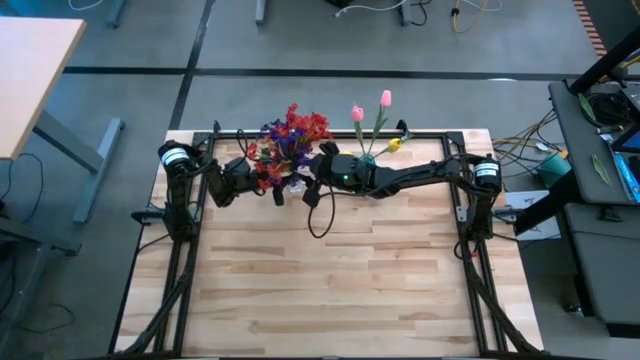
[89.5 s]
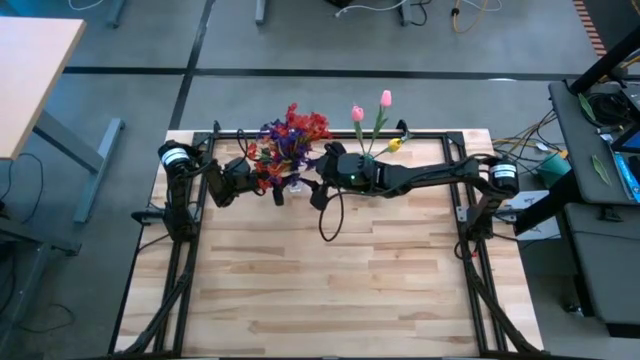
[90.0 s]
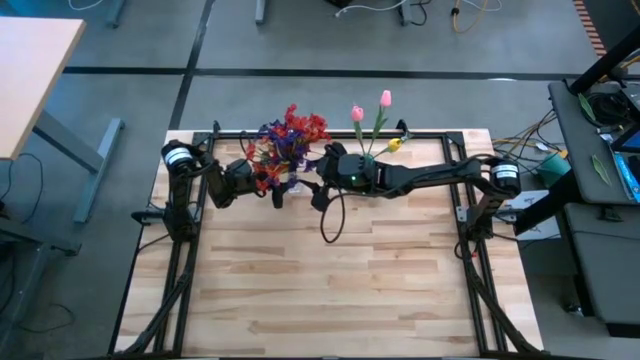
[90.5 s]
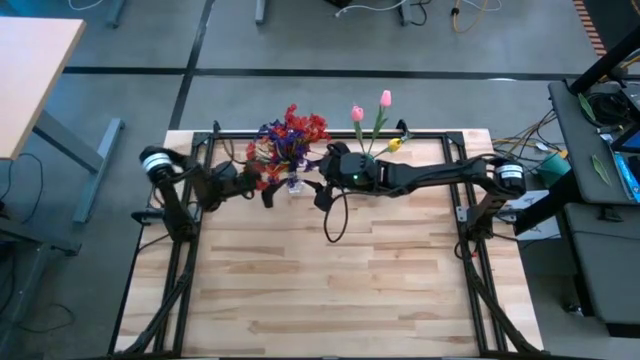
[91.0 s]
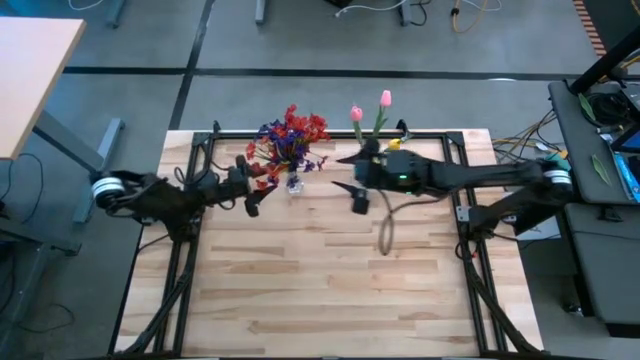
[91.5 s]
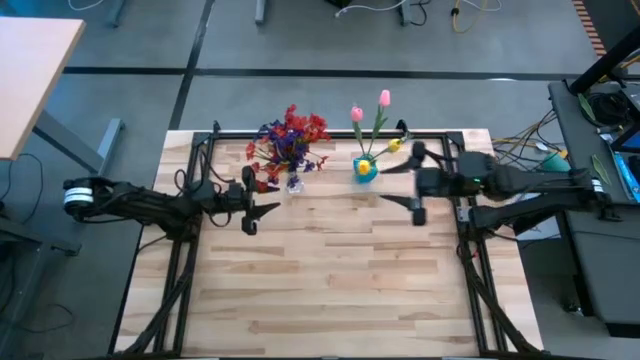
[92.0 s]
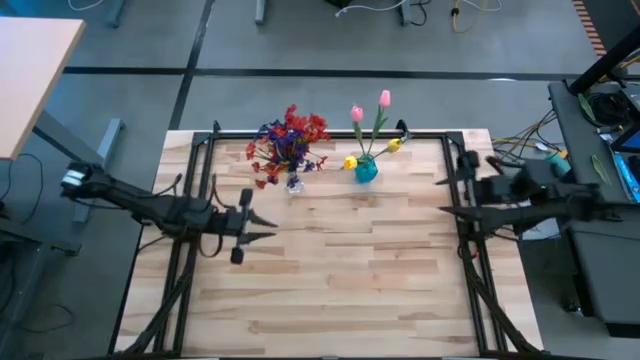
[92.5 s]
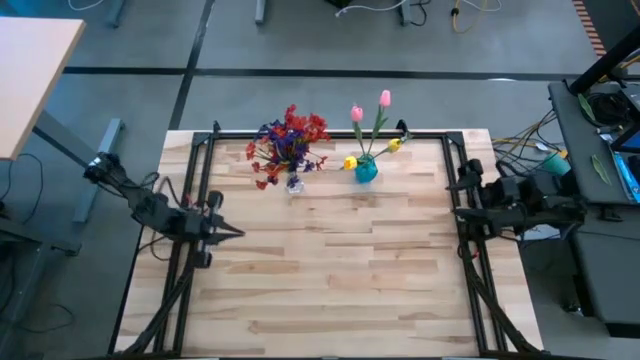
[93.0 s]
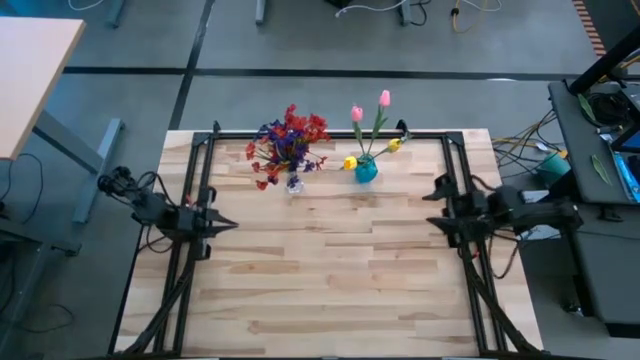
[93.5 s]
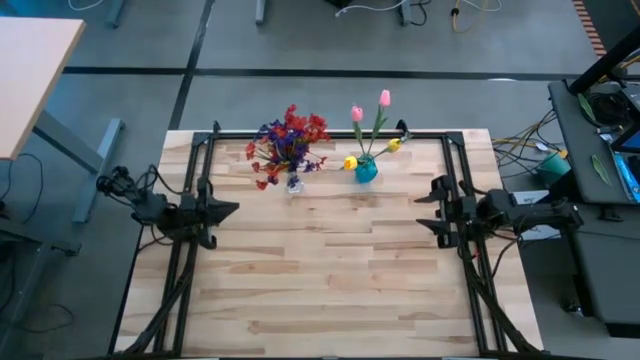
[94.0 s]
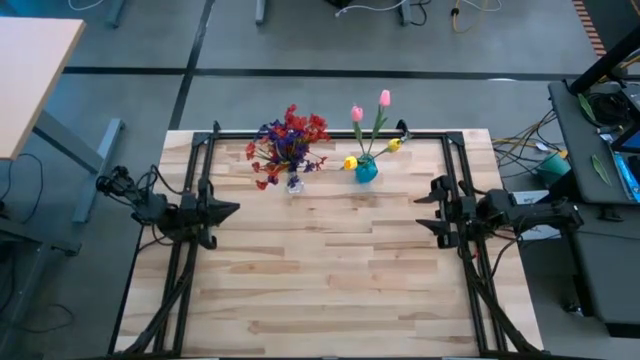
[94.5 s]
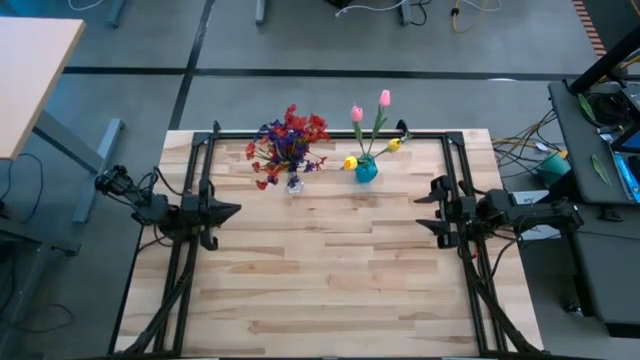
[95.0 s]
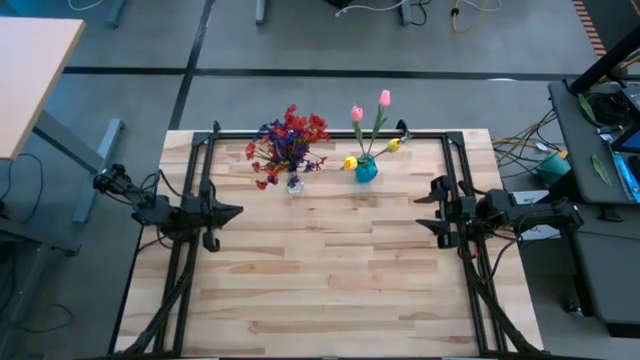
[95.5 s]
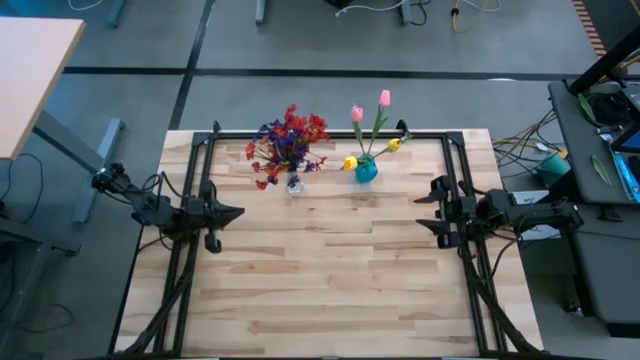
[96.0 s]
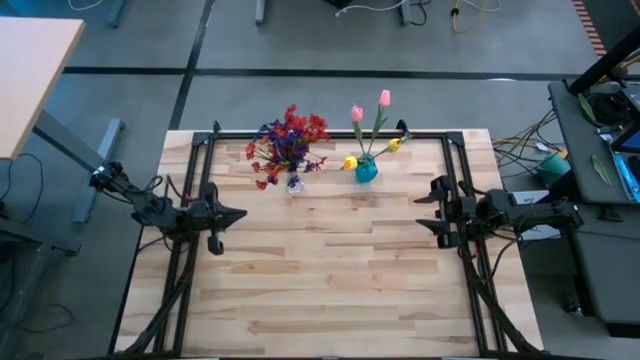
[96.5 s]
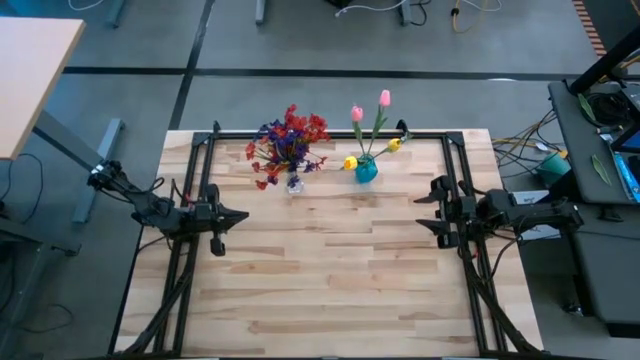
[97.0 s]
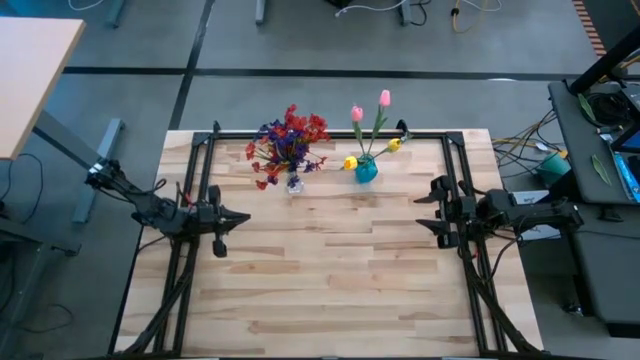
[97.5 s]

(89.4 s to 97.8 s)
Task: Sort flowers into vase by color
Return to Home Position

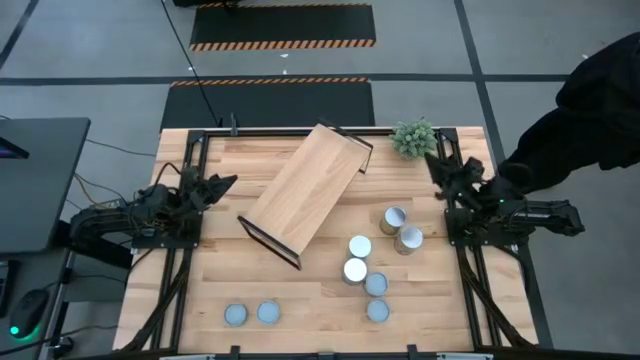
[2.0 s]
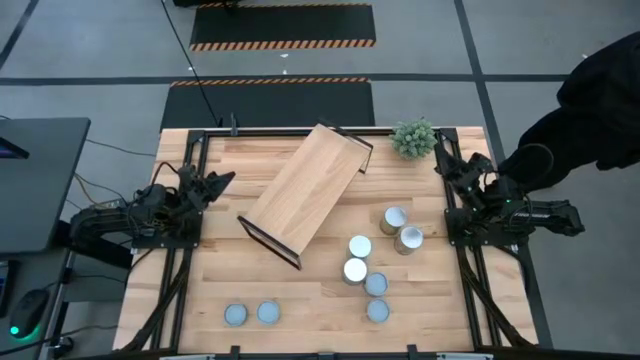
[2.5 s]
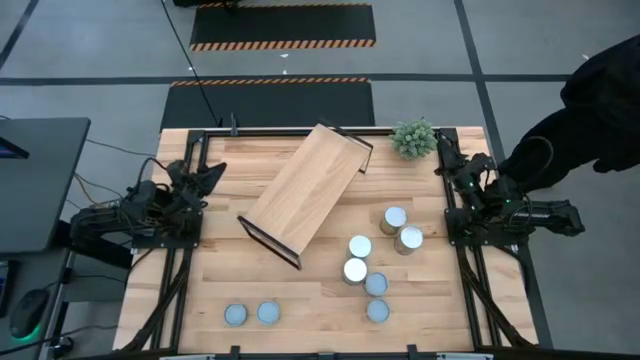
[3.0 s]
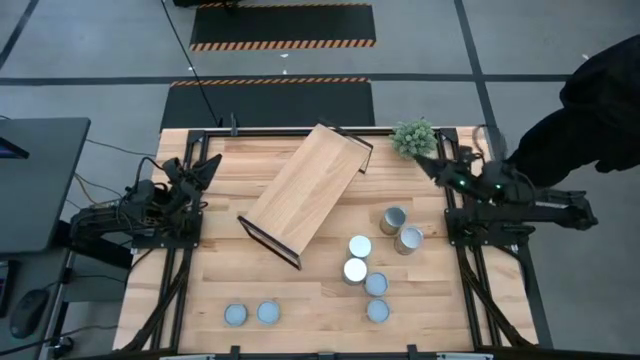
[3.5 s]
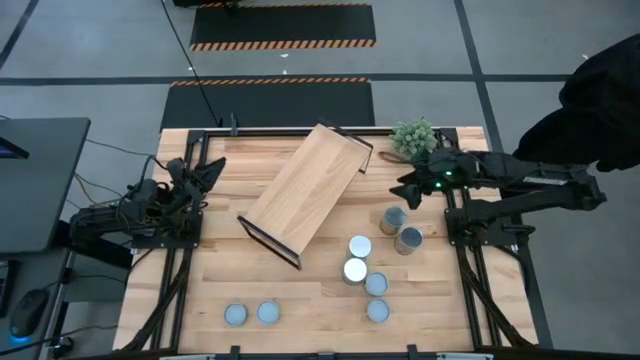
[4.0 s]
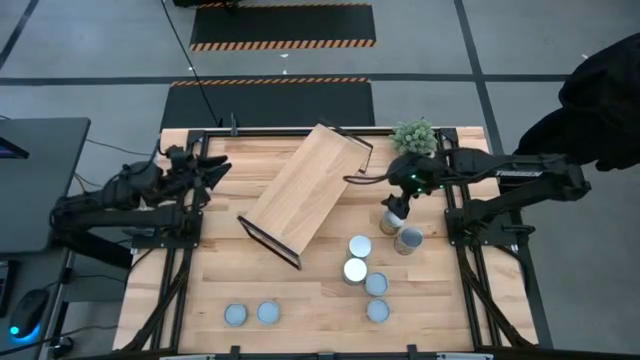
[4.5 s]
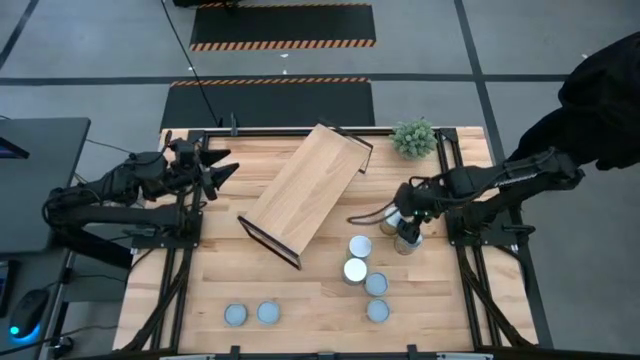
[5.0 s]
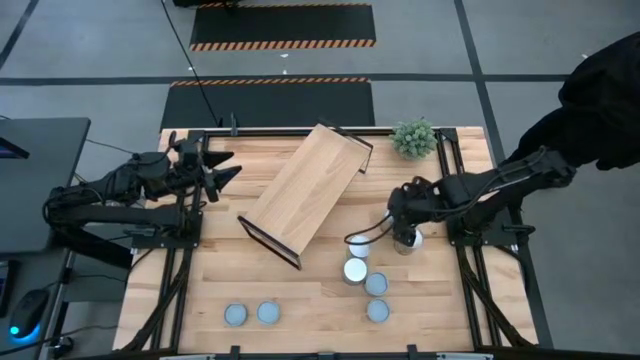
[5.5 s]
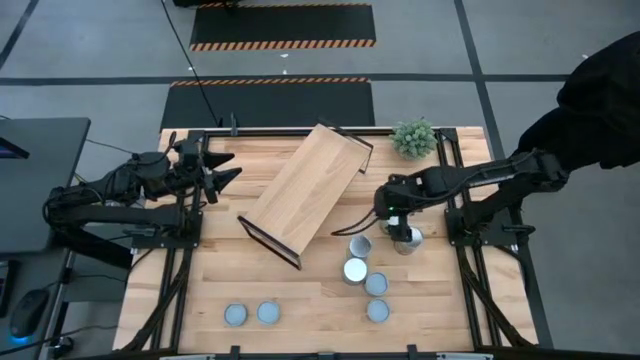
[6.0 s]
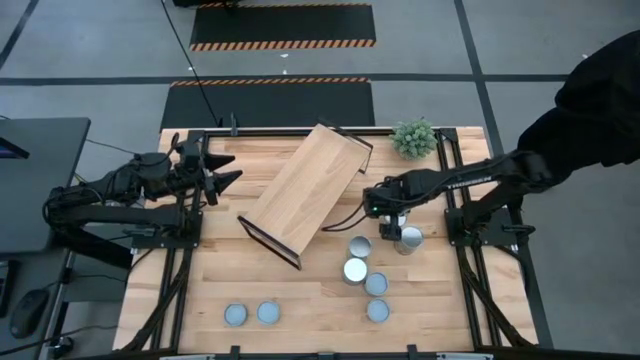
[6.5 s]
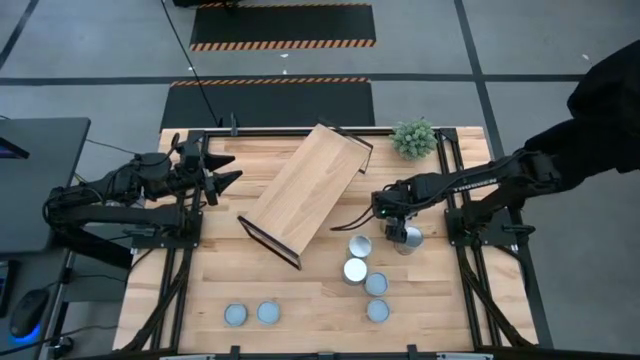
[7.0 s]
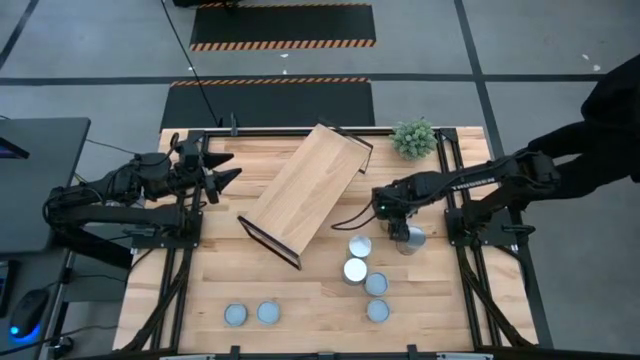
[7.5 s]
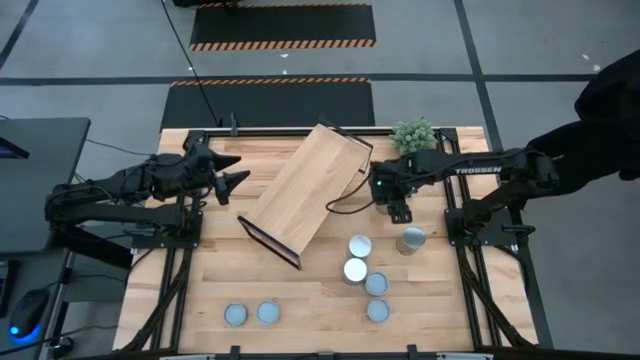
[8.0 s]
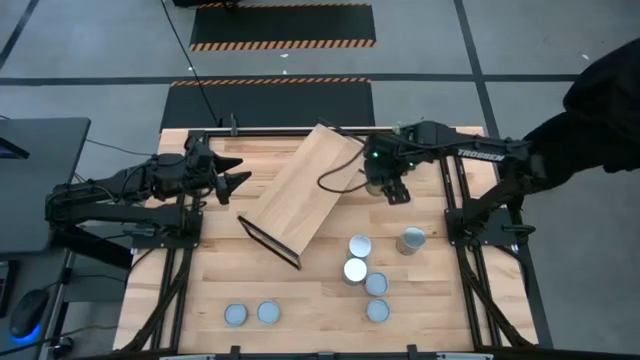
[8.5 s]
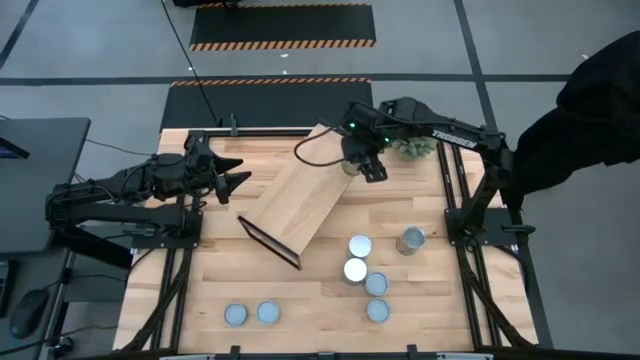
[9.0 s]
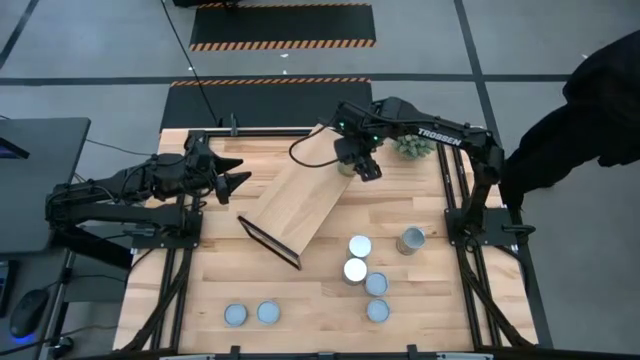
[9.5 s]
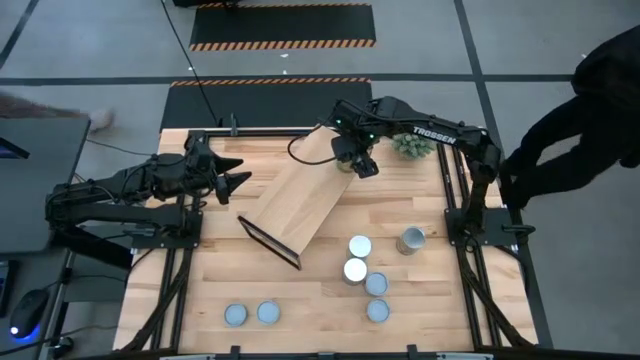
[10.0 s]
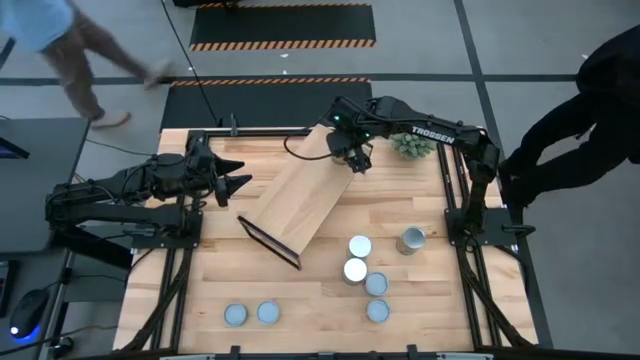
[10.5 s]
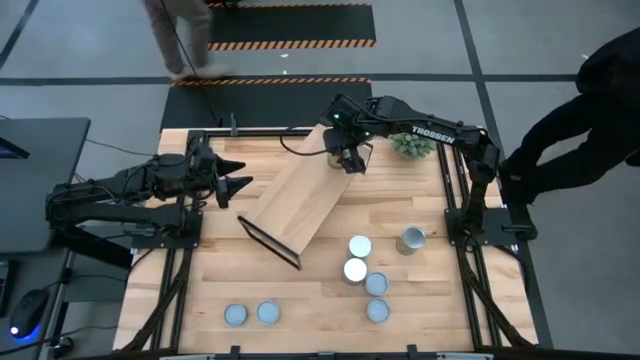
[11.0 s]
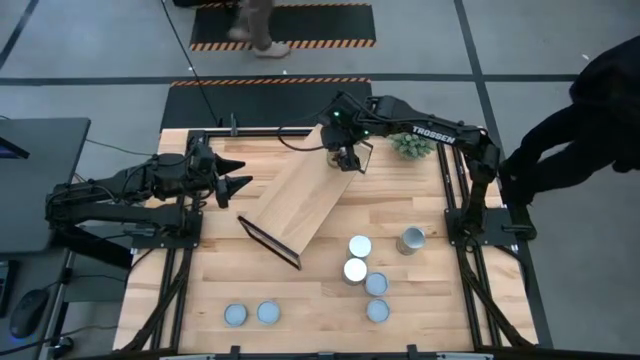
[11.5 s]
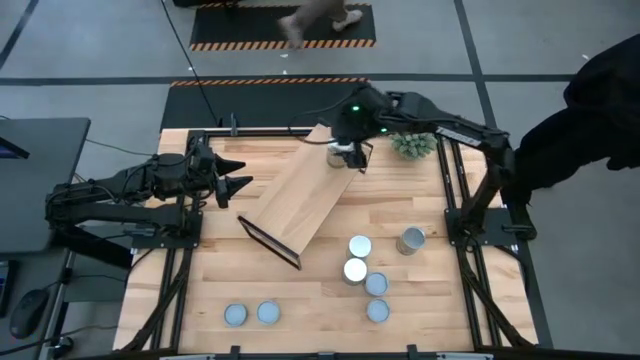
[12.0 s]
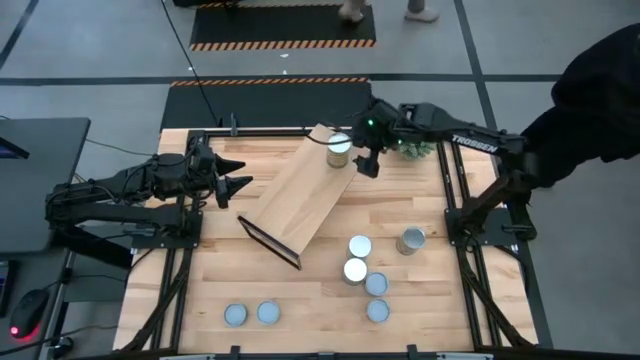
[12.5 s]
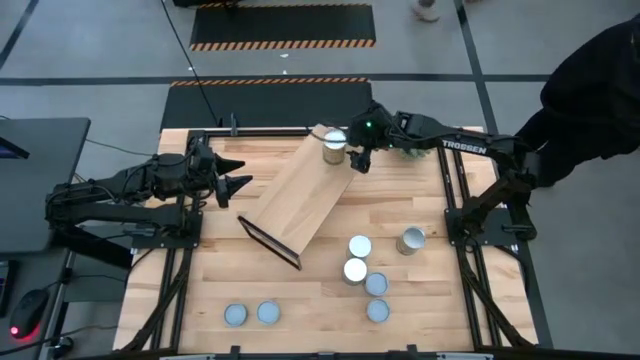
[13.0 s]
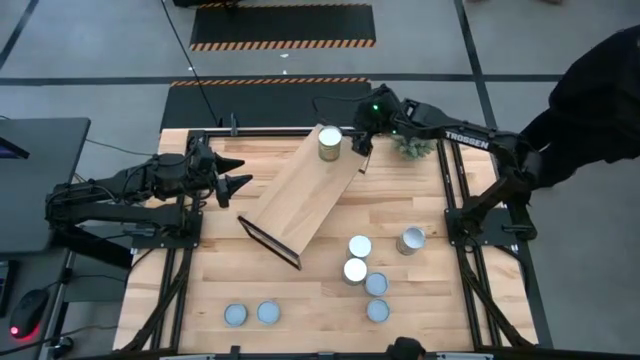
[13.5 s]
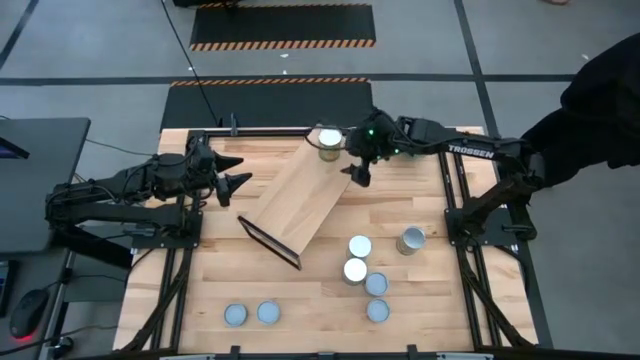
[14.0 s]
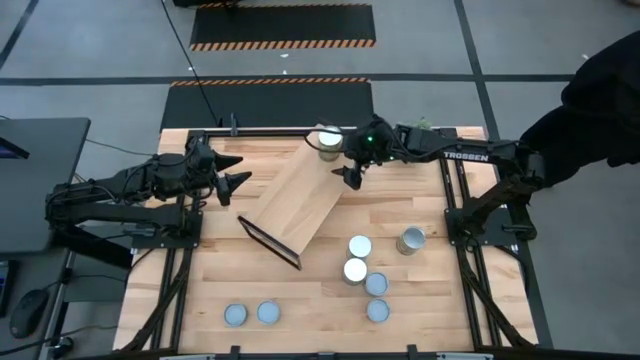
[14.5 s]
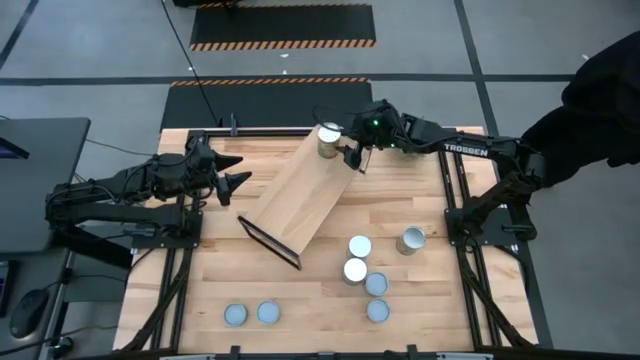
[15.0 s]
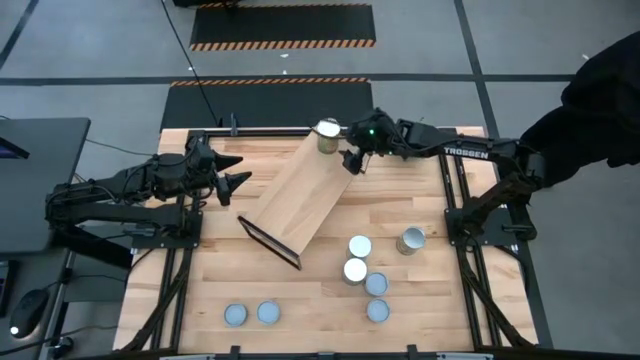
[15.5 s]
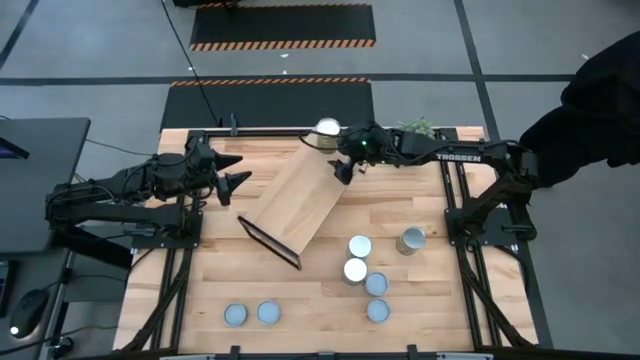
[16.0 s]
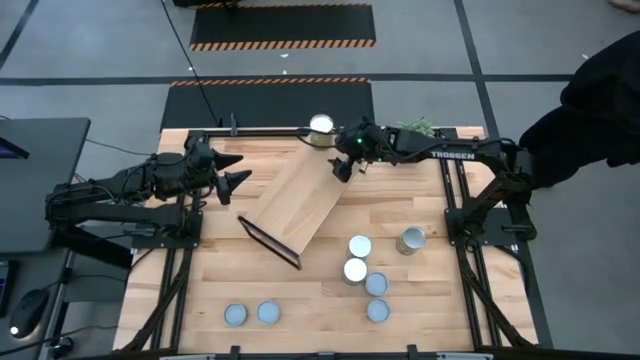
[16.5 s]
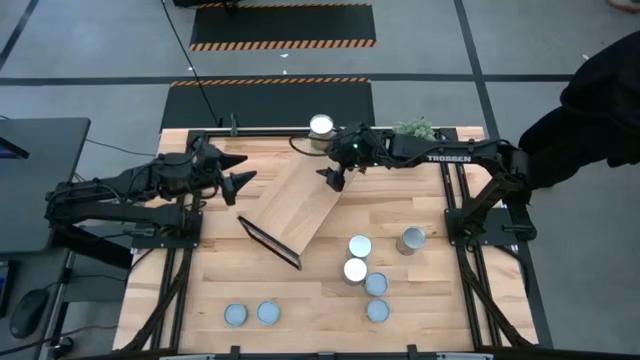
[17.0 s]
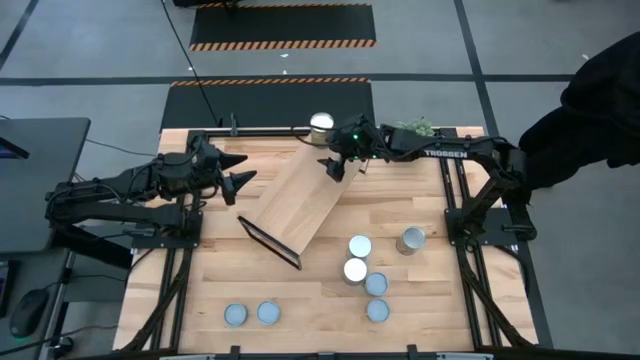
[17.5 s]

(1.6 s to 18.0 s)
Task: Pick and place cans onto a shelf
Put the canned oranges on the shelf
